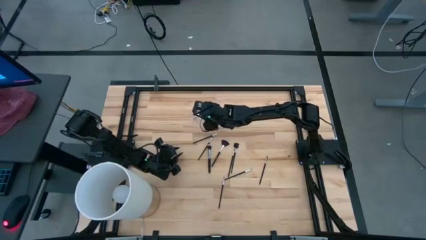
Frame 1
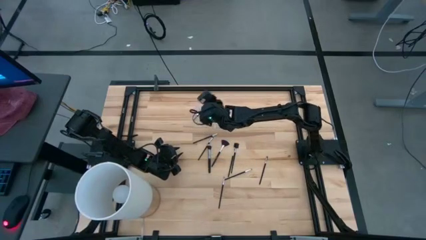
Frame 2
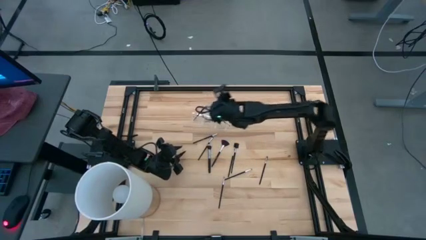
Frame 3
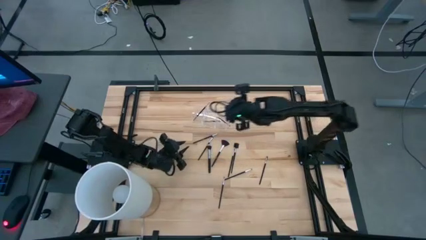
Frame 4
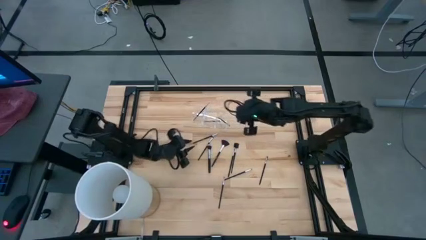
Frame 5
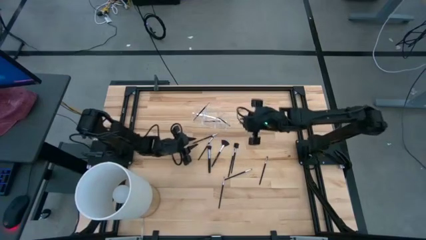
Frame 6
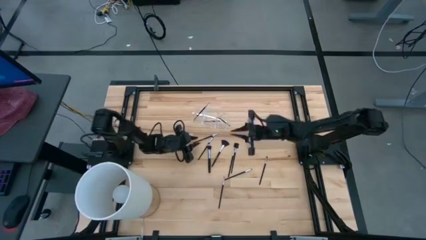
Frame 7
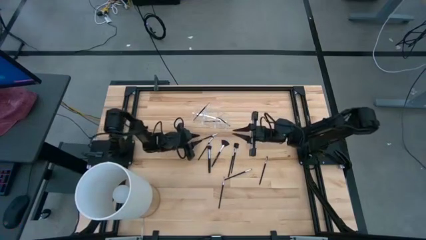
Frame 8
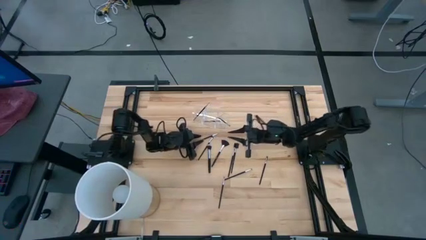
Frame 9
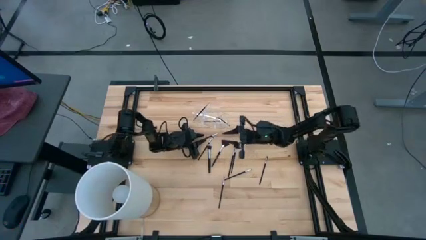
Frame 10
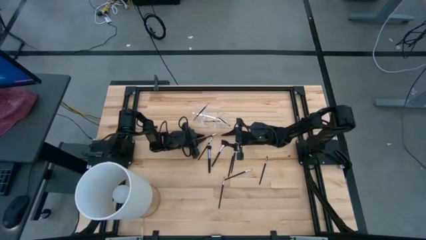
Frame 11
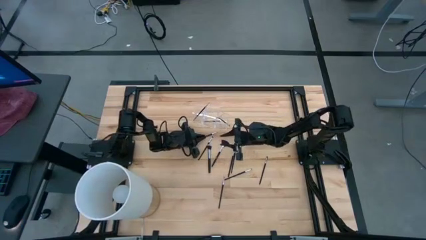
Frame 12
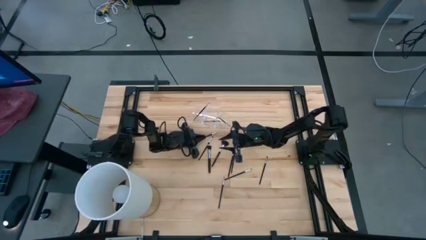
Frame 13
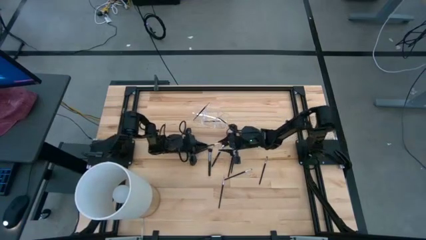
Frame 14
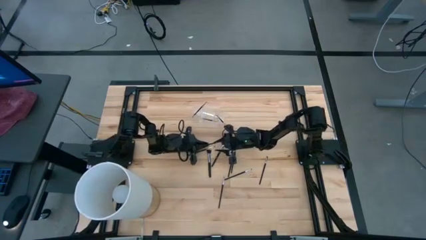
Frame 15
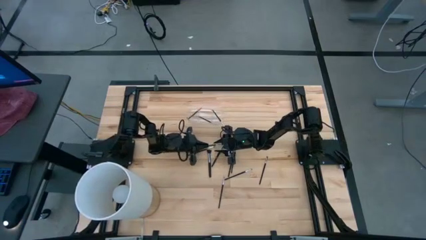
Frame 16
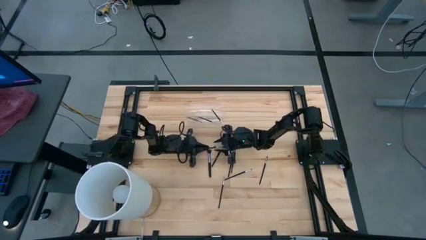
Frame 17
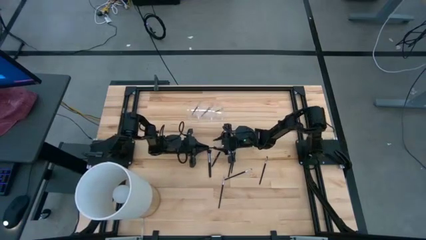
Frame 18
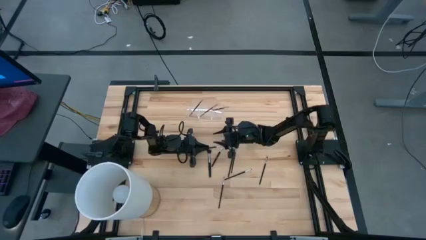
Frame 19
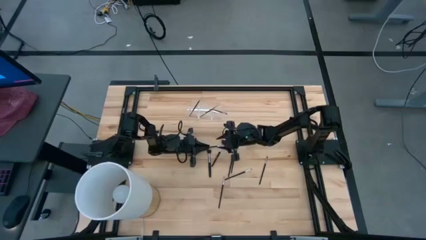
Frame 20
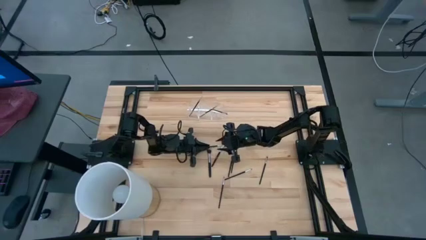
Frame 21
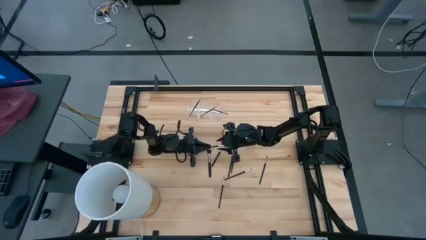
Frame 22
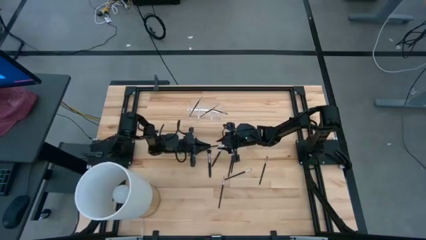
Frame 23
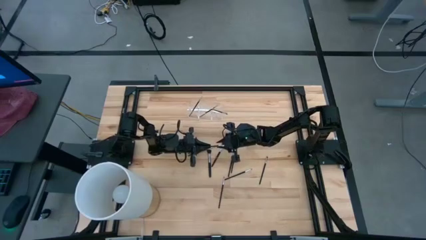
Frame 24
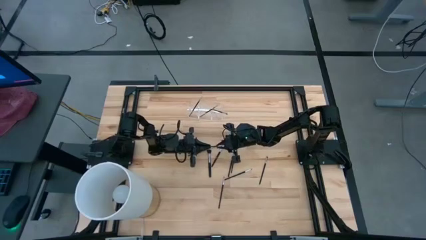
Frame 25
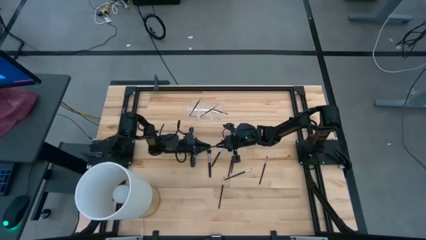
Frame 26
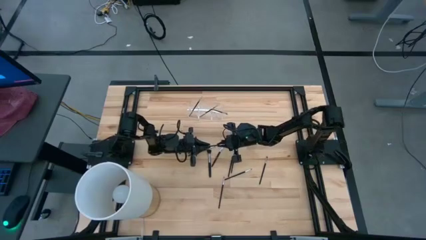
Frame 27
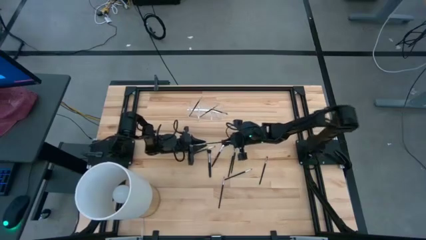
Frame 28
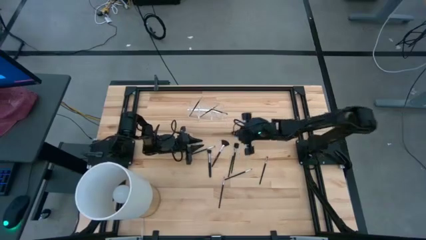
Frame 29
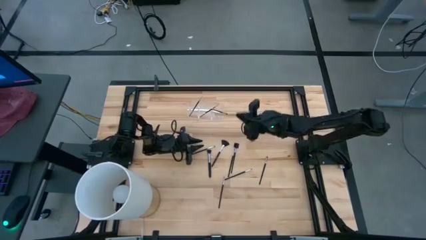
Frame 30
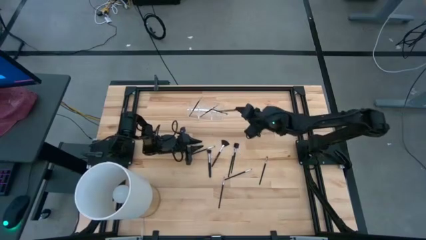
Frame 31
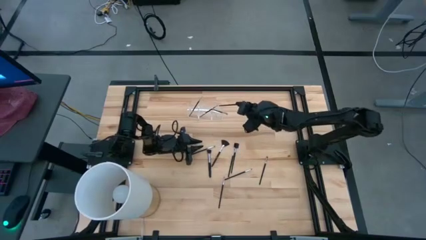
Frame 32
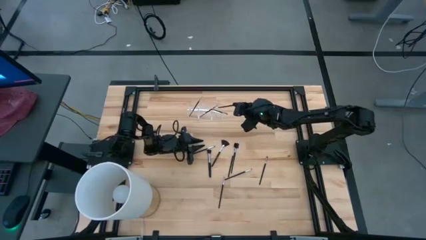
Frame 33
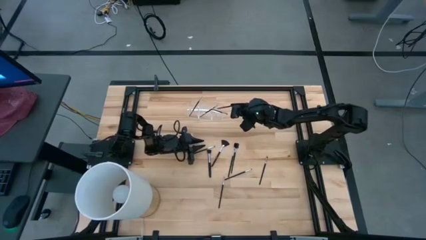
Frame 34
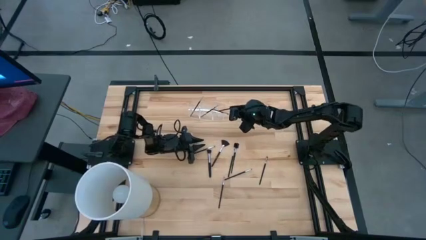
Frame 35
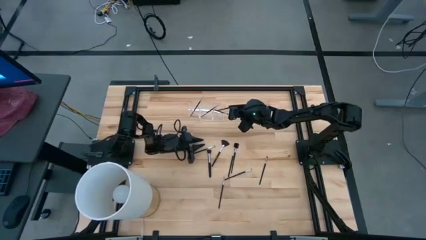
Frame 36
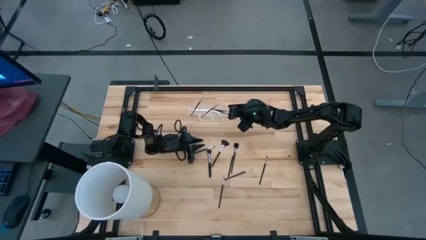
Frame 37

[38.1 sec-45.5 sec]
Task: Put items in baskets/containers
Put the black liner brush into the transparent organizer

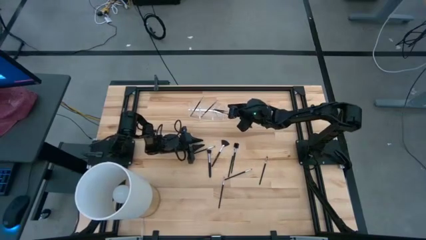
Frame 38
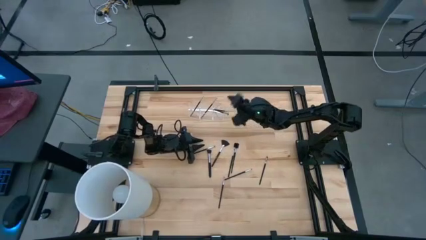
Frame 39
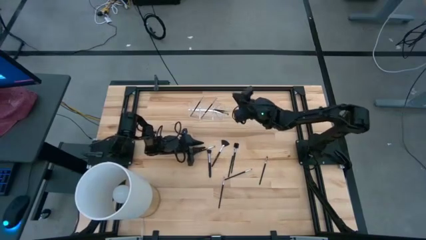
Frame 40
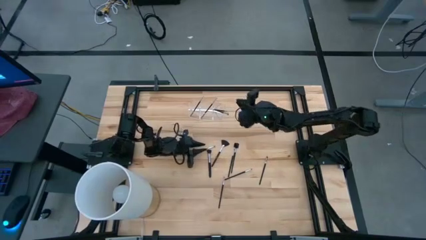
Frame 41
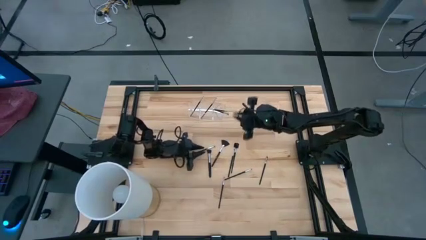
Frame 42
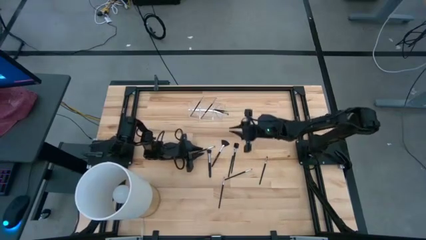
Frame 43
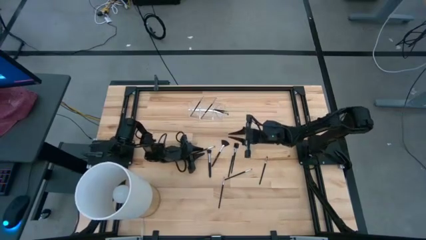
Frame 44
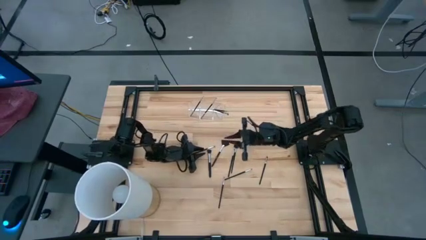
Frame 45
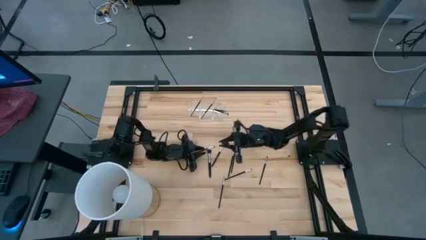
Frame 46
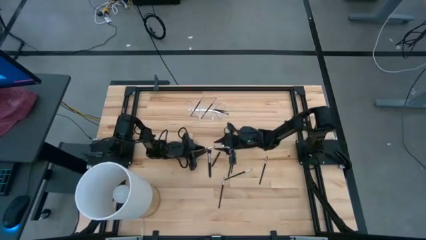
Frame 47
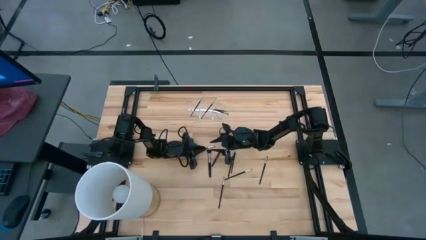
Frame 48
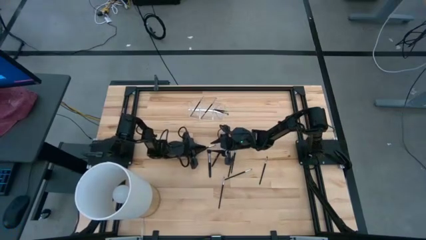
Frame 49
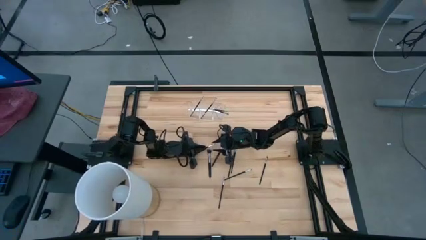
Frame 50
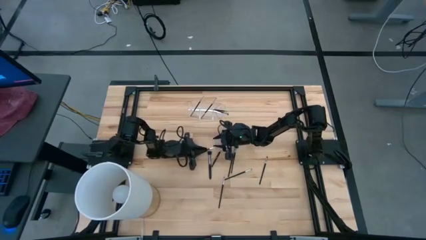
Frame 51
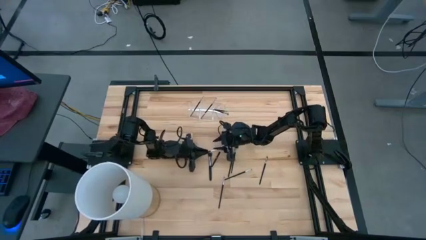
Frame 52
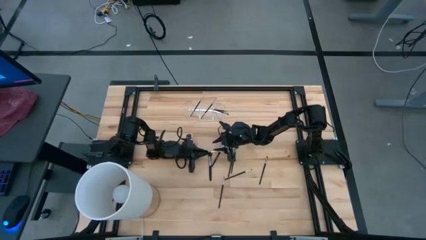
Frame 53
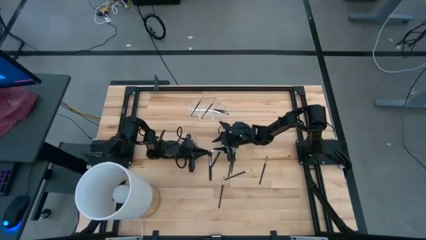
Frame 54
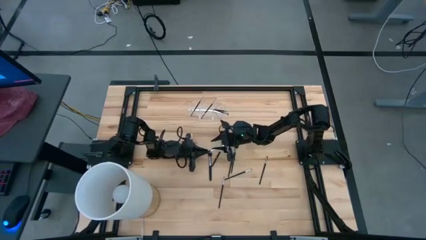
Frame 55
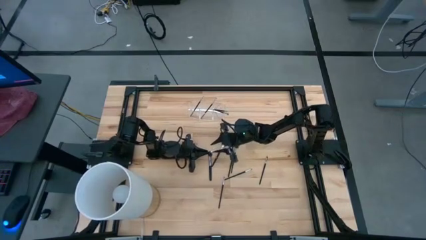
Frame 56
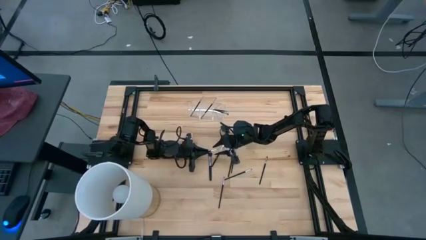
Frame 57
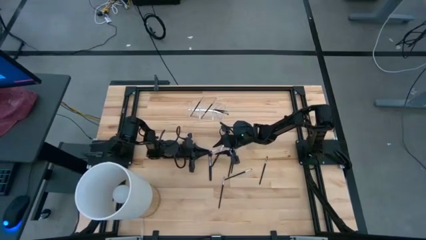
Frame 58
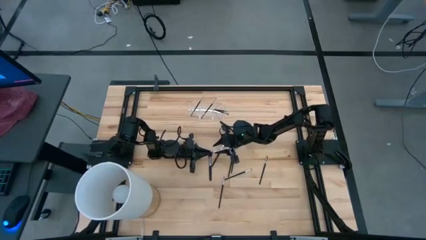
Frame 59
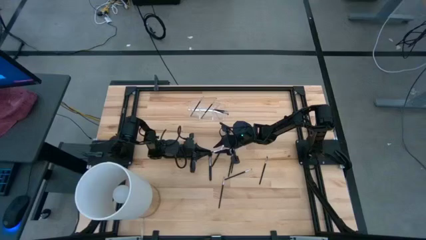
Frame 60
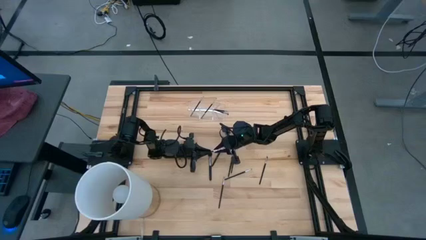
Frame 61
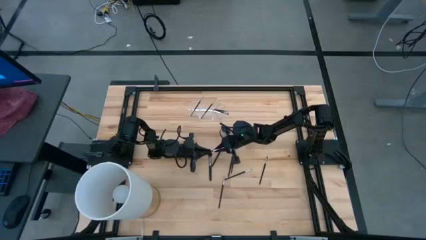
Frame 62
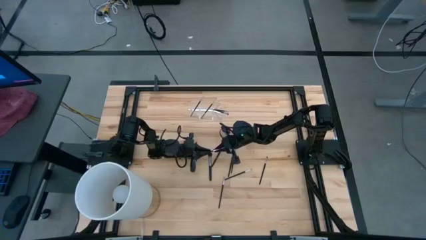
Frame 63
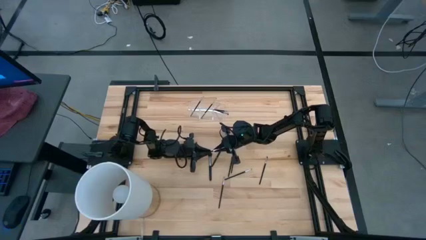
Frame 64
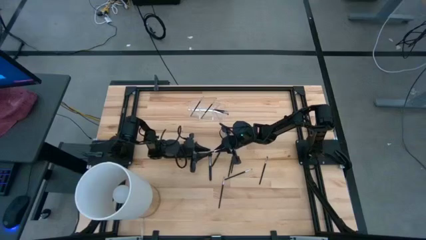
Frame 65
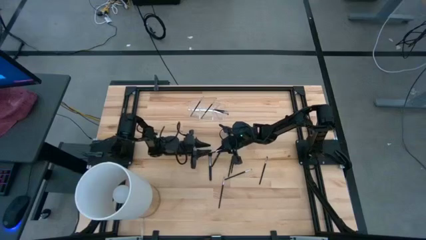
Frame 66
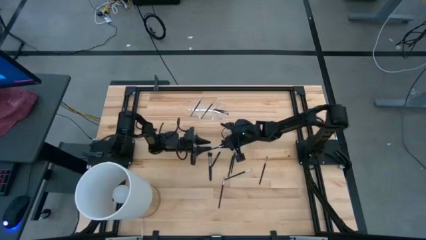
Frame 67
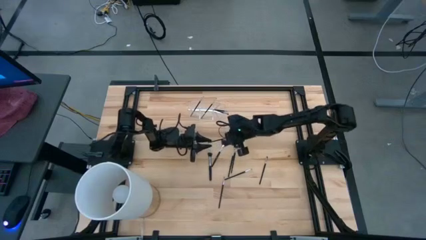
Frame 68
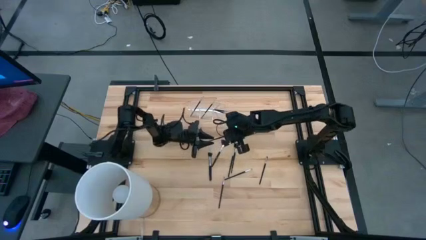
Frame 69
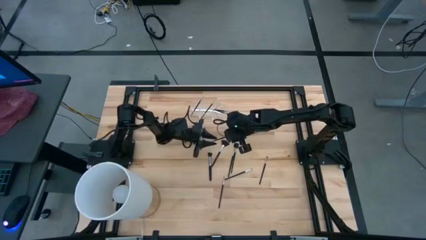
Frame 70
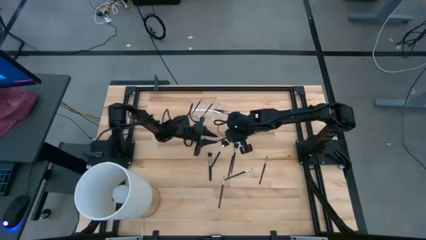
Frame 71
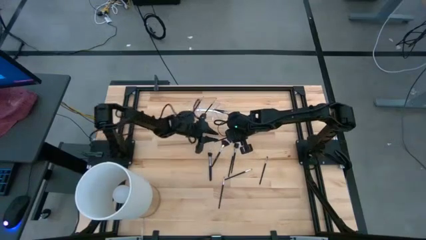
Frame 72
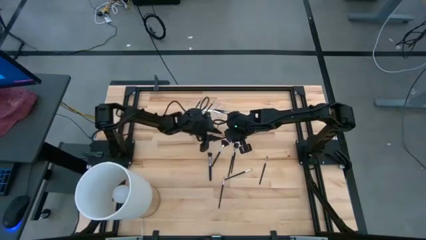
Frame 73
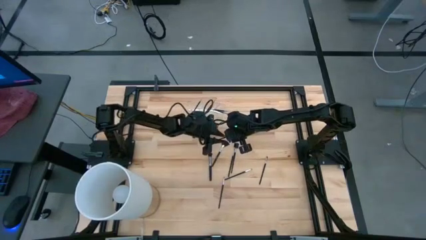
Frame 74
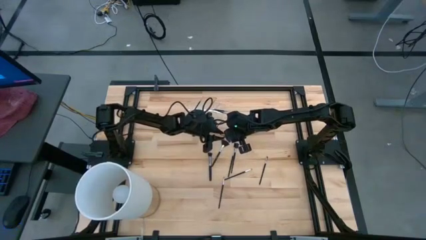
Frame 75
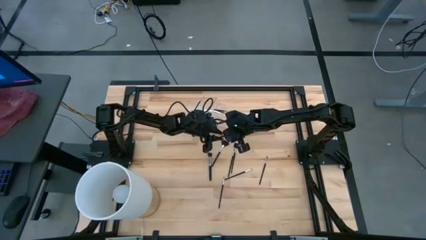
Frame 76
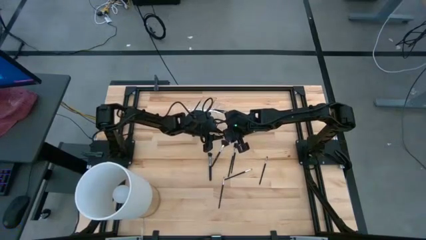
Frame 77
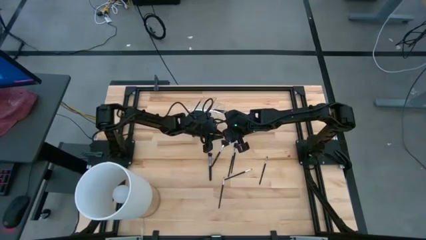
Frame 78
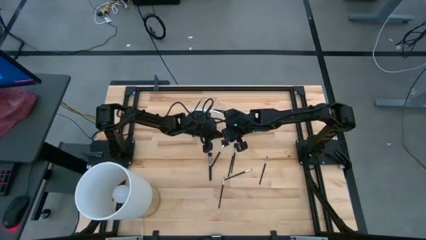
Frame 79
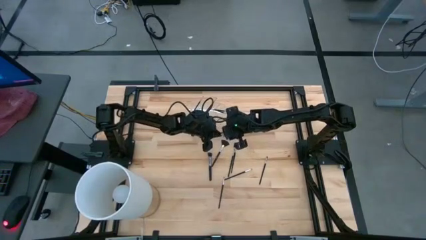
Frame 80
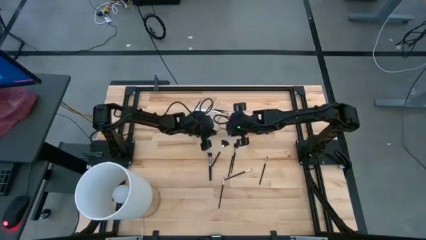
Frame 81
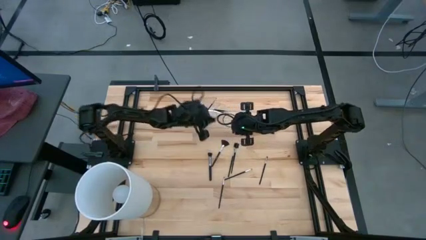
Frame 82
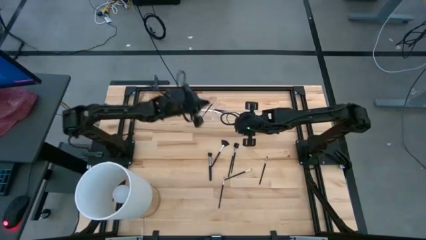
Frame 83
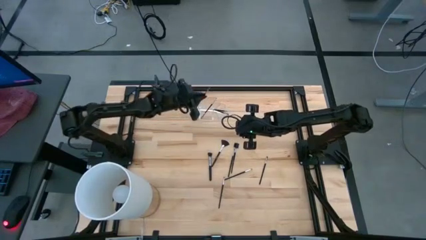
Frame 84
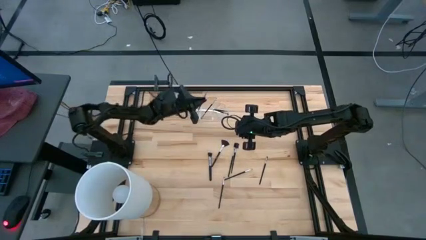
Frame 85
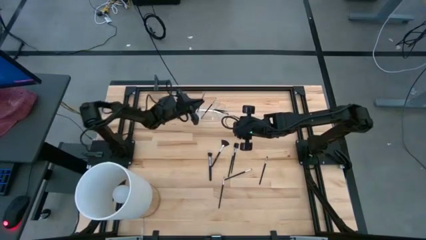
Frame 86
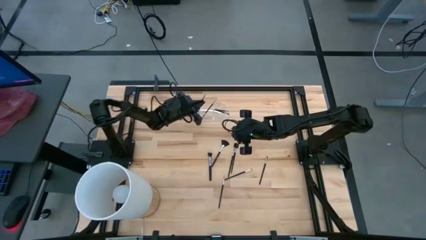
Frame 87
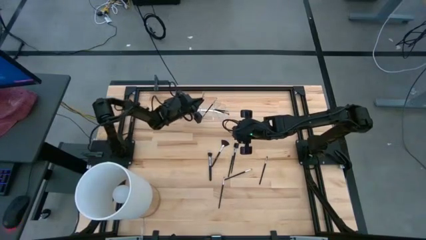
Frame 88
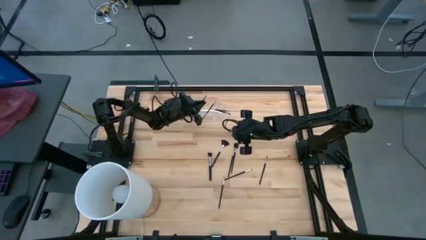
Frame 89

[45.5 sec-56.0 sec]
Put the black eyeshadow brush into the transparent organizer
